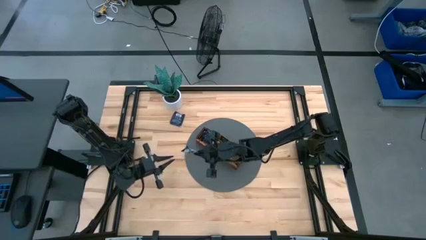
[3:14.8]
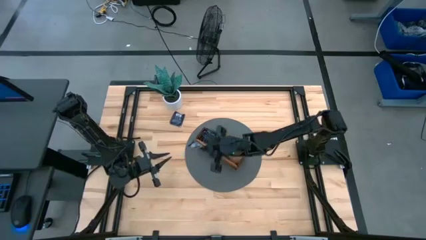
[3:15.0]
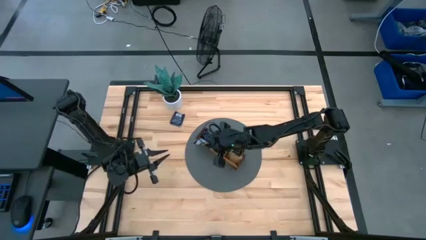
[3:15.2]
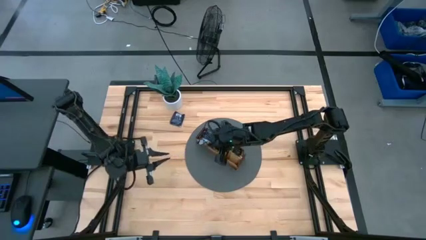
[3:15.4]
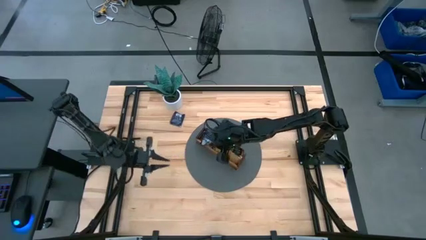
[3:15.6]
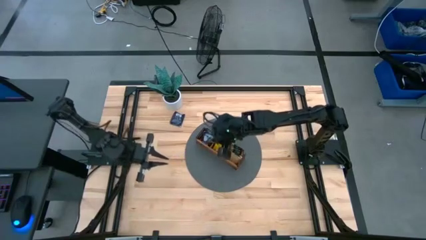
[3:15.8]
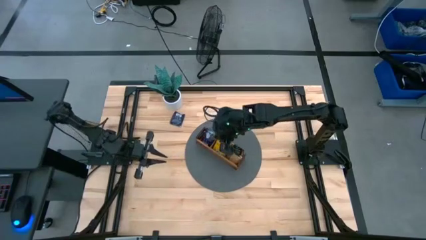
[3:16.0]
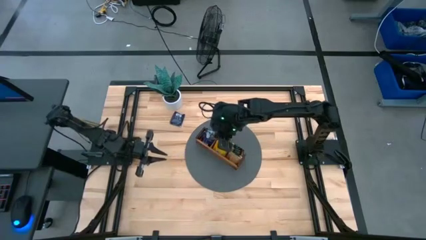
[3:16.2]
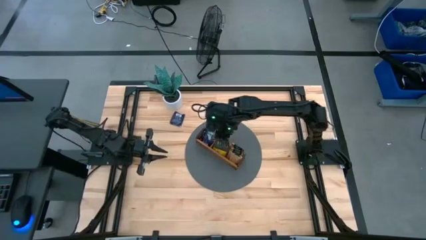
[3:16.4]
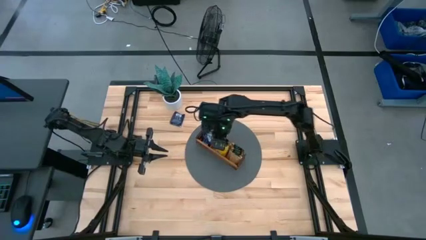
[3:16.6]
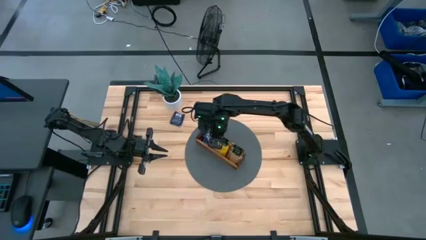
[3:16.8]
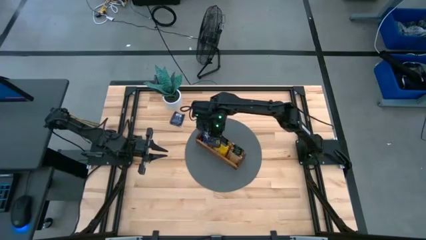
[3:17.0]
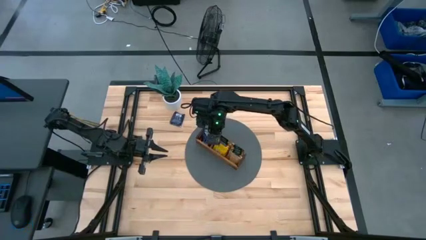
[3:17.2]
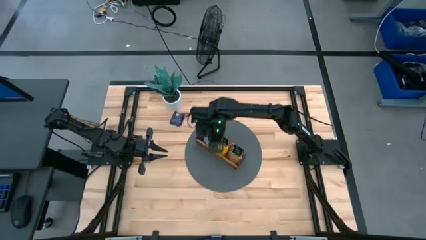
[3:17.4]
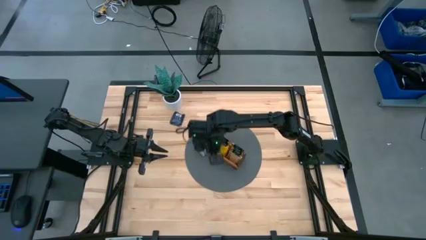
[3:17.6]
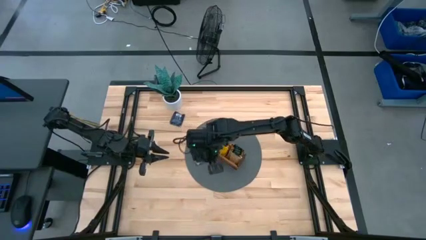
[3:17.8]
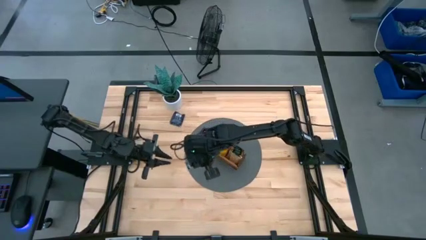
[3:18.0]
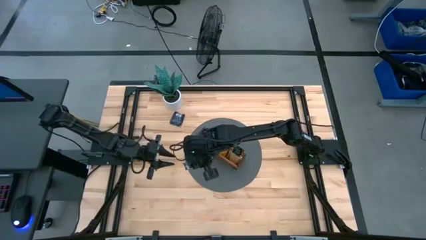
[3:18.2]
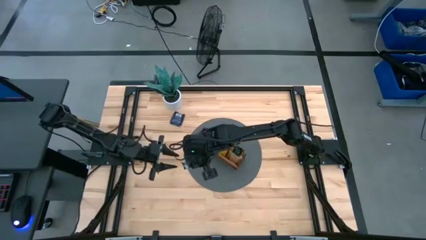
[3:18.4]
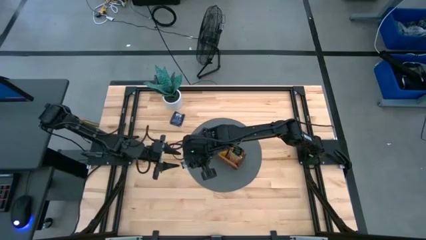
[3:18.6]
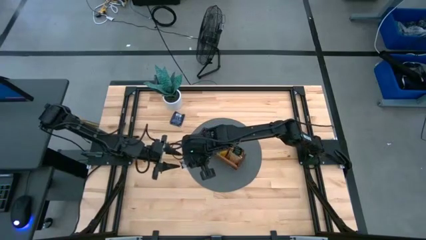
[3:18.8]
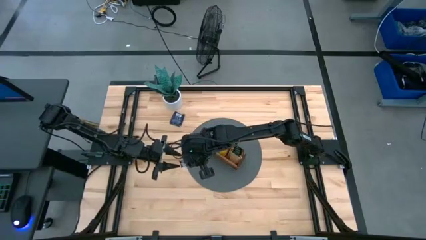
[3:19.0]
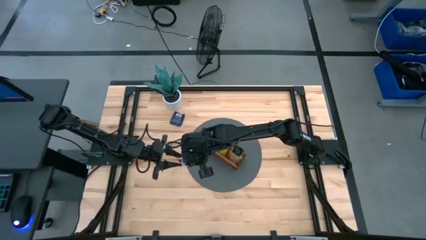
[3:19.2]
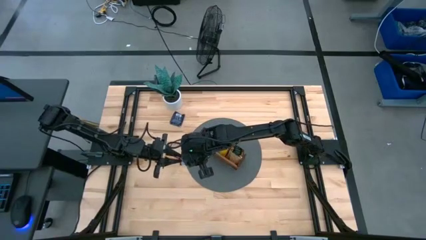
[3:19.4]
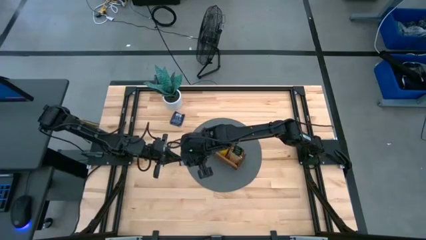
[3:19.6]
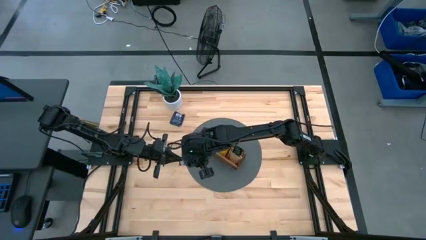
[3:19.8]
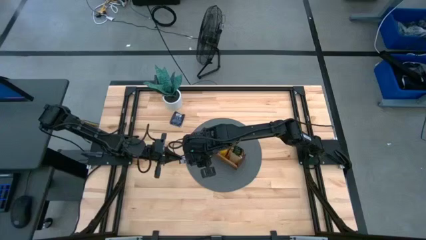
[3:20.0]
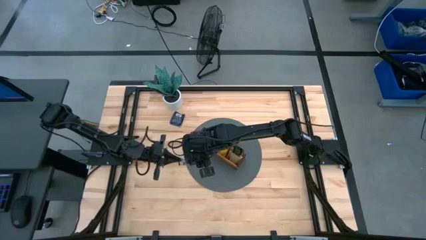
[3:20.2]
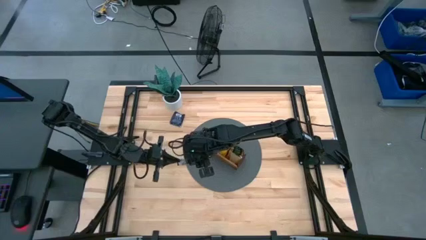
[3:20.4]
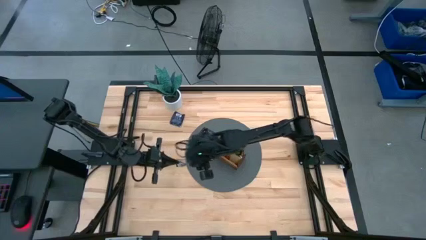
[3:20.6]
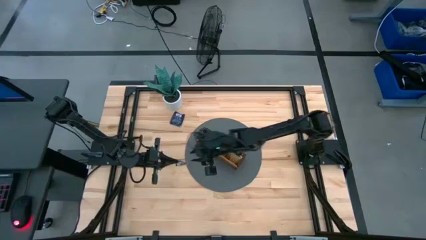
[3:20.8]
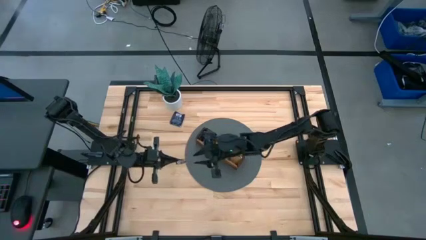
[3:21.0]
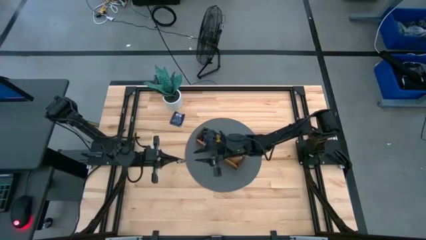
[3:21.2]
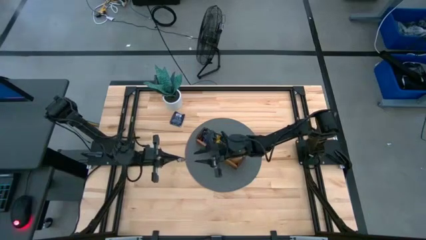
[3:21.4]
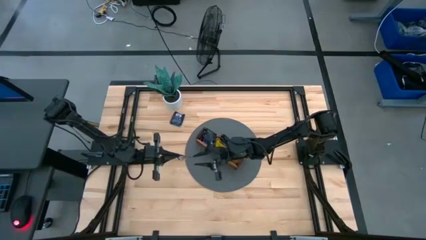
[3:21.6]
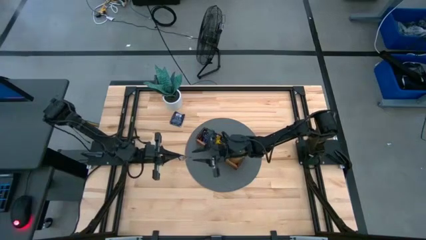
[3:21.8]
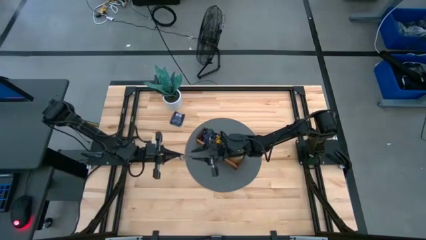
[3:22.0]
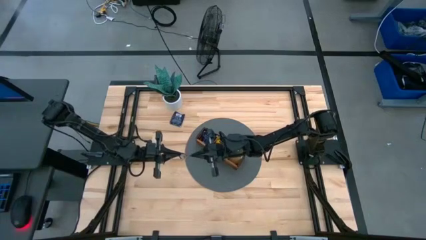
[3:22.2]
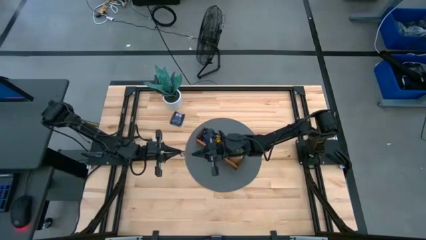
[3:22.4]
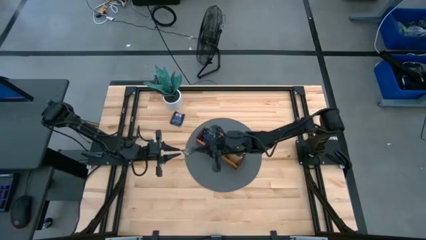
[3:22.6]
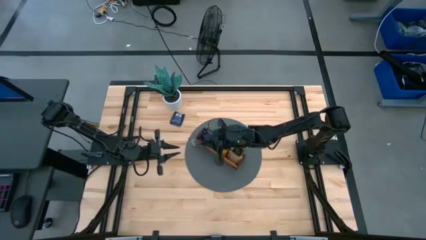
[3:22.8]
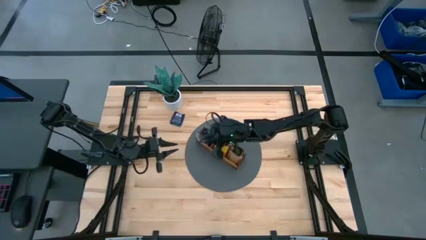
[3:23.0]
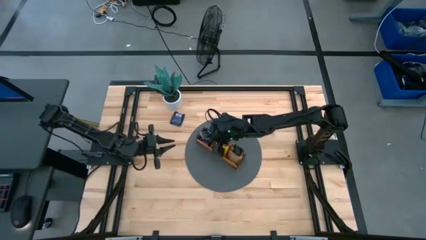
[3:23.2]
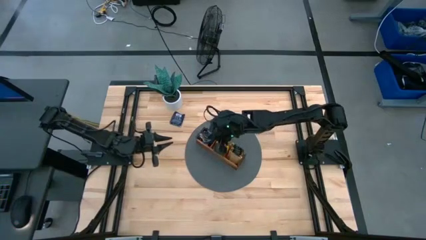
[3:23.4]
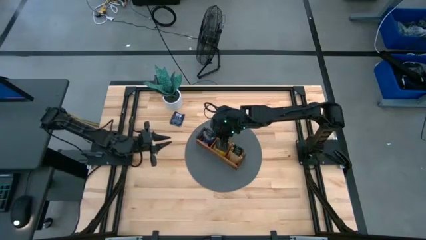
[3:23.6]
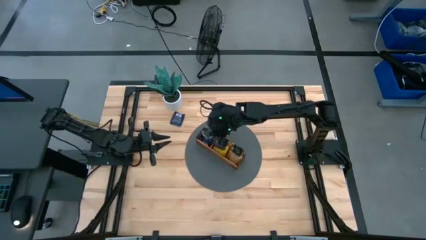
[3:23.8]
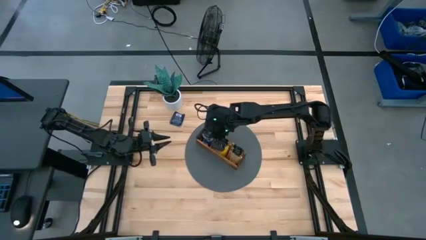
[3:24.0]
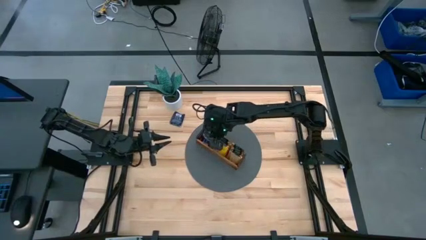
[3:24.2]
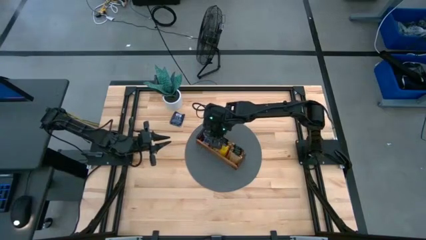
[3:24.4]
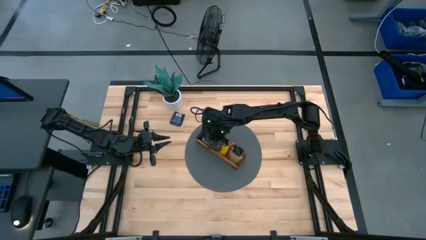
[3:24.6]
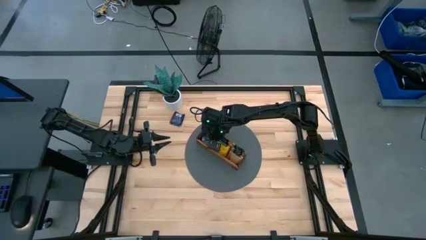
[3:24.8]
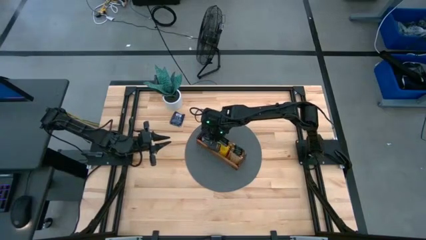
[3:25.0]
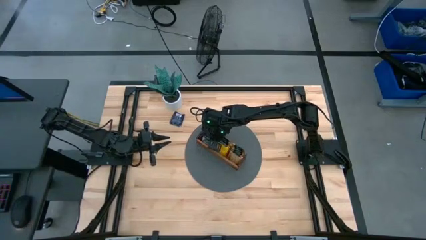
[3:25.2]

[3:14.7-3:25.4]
Task: Pick & Place Tea
Put the dark blue tea bag into the left section of the wooden organizer
